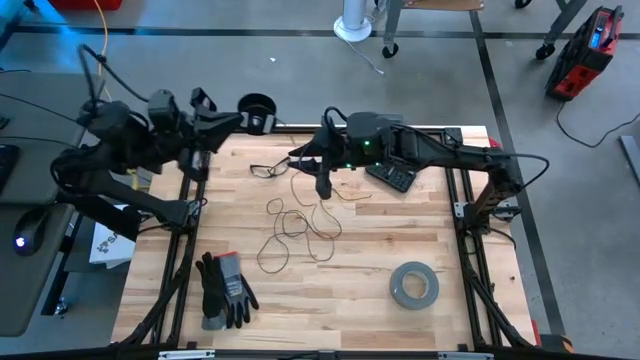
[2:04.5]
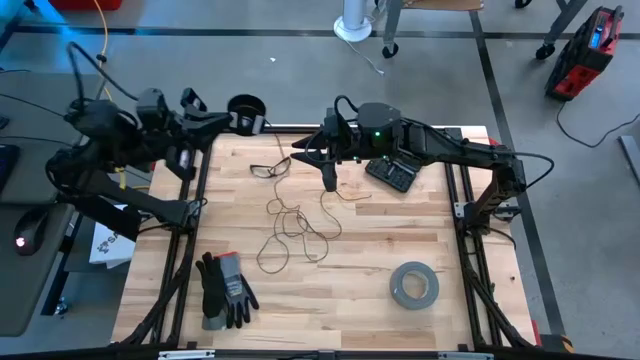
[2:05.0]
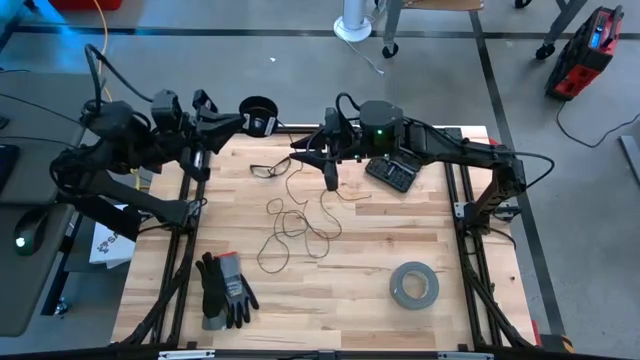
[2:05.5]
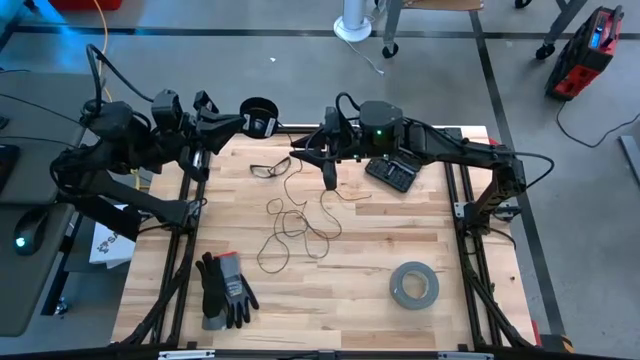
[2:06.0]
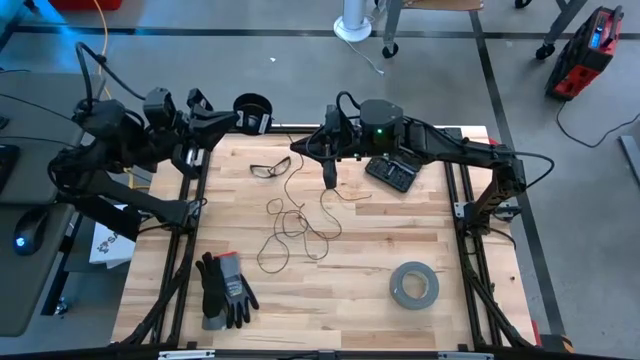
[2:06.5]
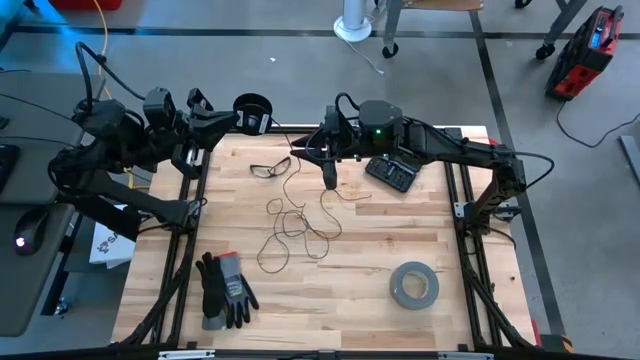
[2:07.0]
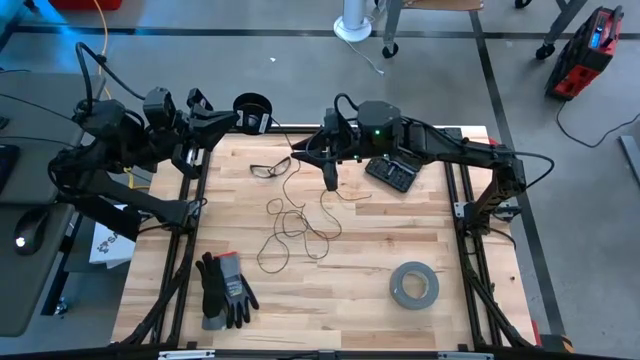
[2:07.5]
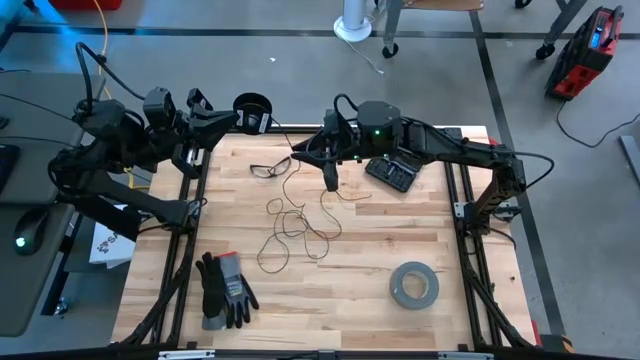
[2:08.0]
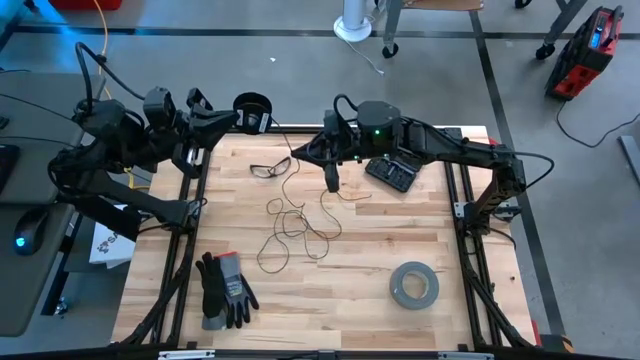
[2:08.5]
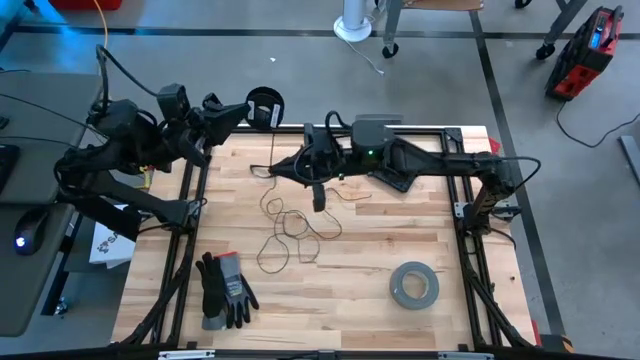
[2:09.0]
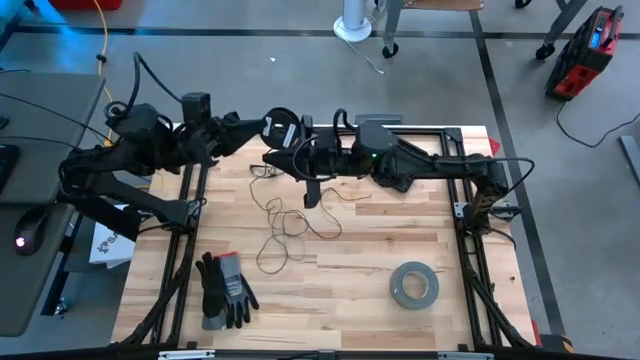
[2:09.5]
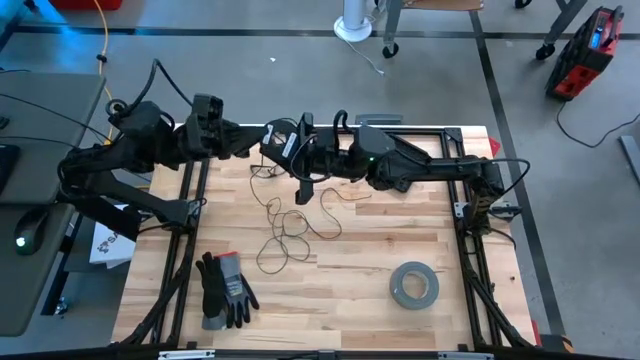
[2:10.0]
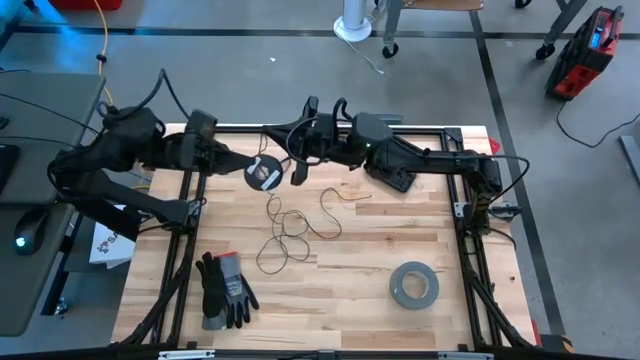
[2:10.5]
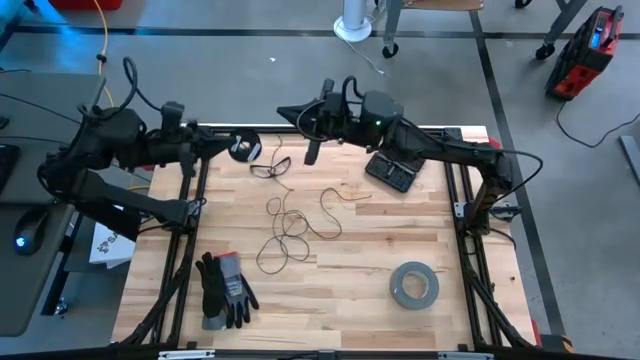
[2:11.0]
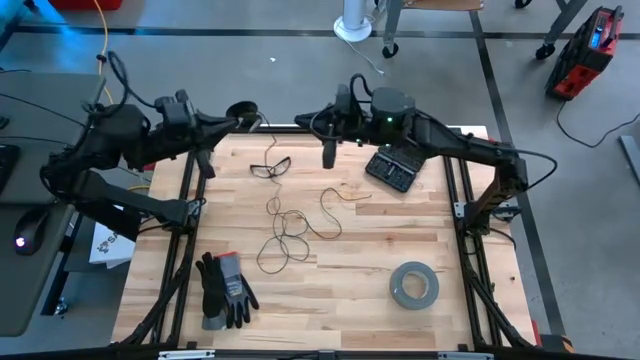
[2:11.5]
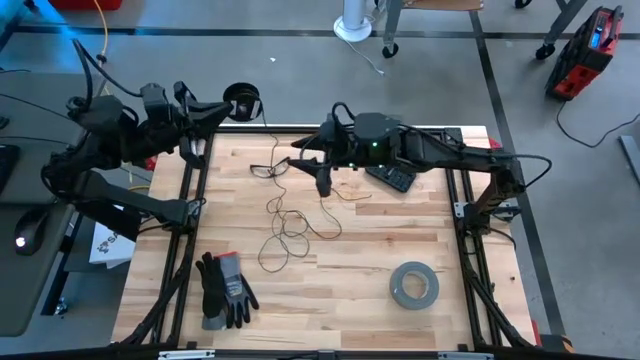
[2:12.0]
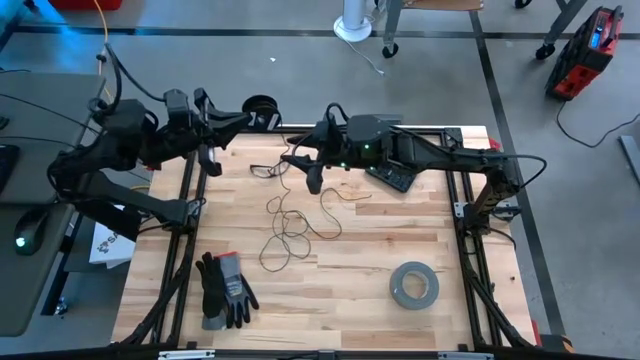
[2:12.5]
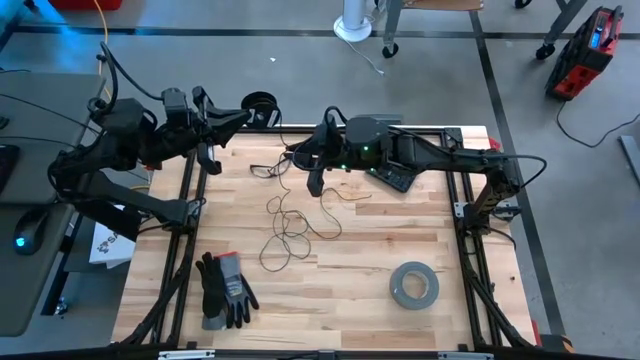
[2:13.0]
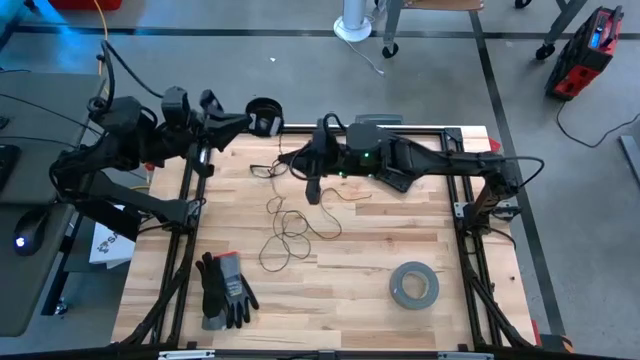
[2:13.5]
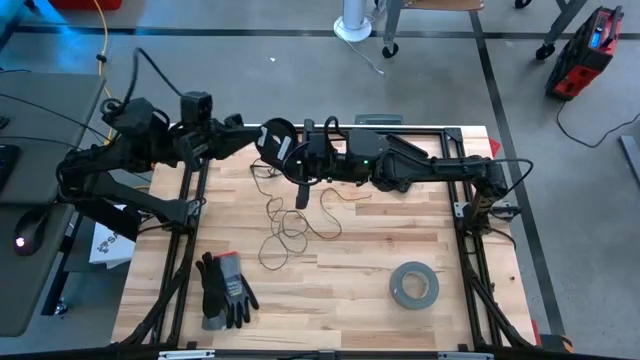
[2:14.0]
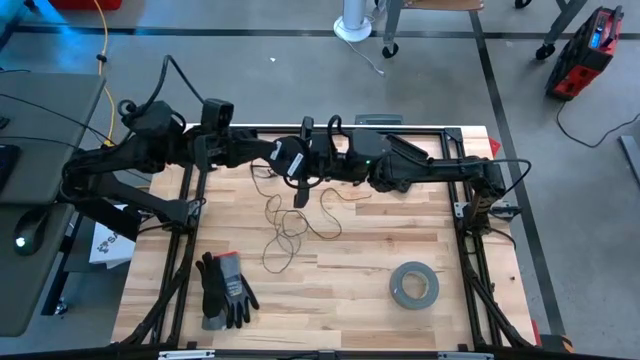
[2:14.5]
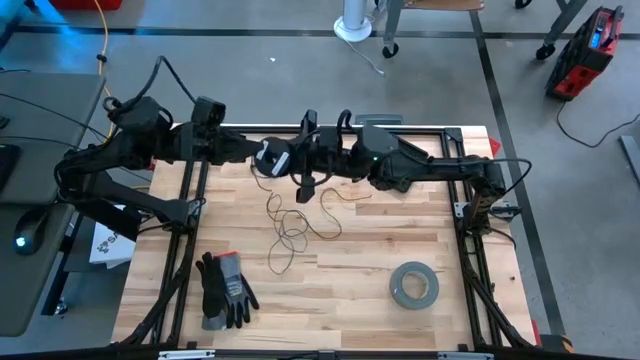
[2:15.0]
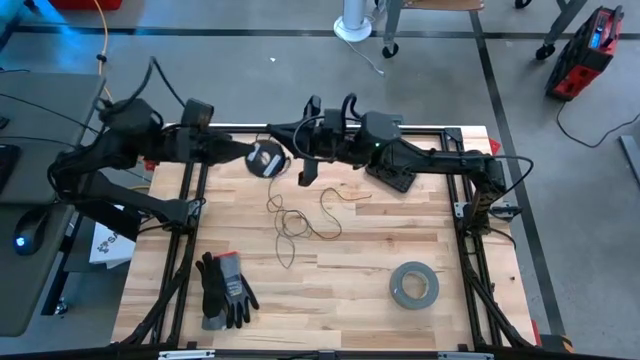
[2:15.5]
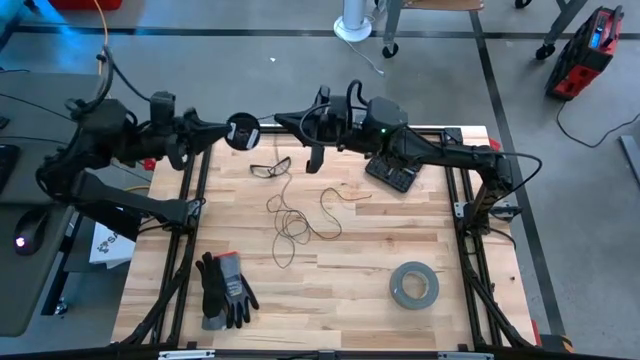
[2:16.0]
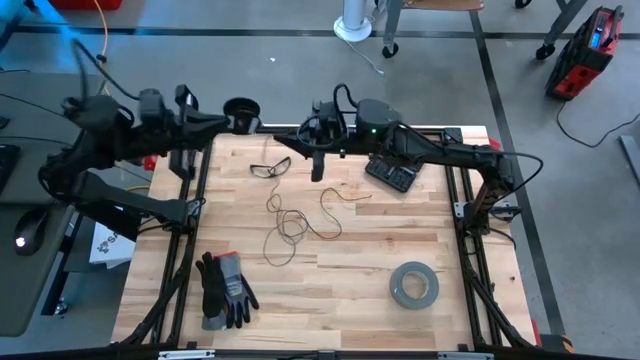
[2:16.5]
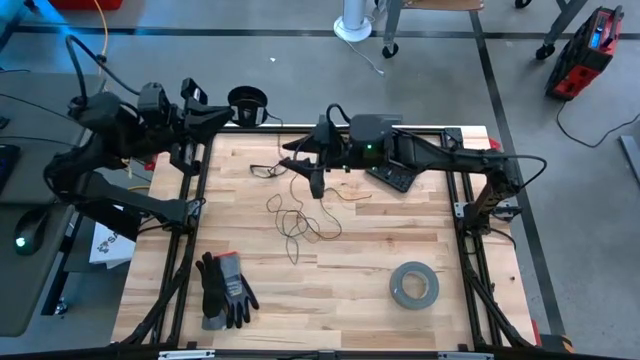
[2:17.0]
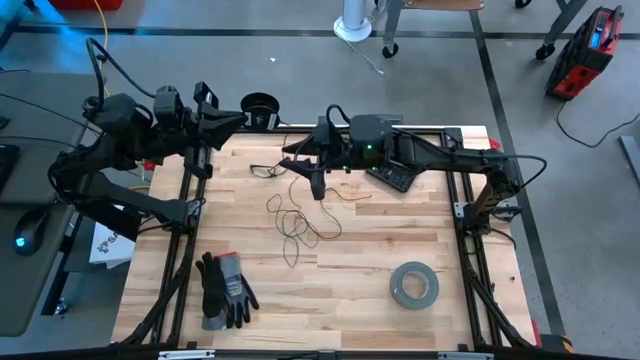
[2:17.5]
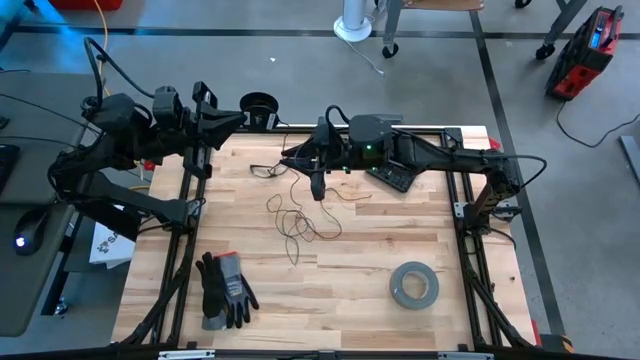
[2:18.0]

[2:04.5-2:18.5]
Task: Coil cords
Coil the black wire on the black spool

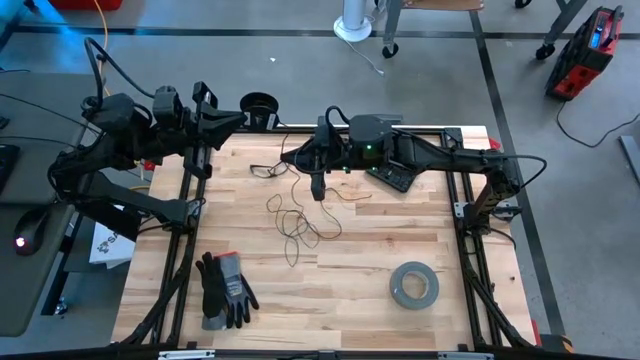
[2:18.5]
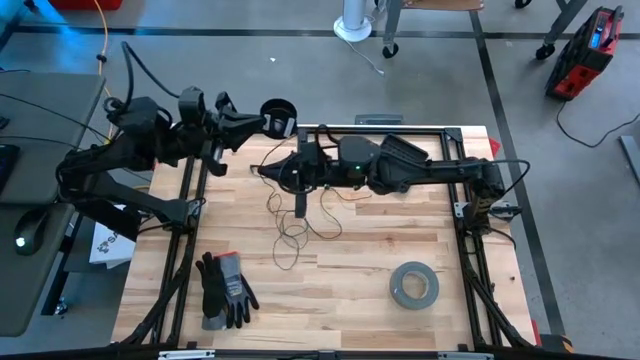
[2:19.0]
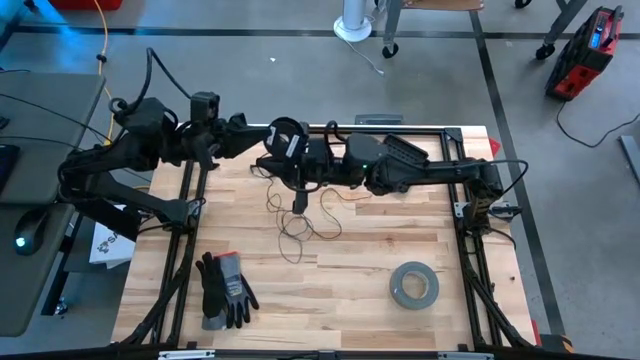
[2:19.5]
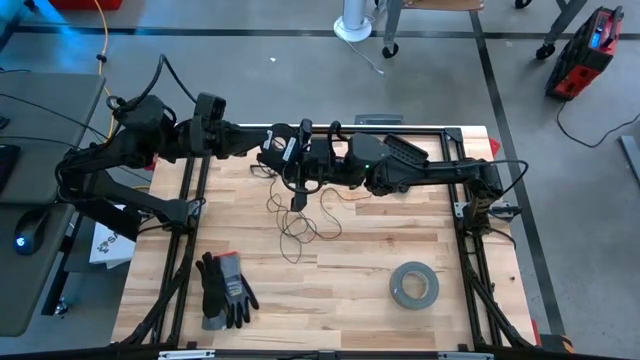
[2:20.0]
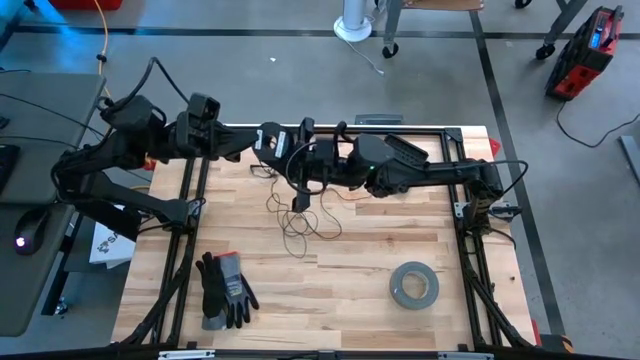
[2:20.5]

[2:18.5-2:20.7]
Coil the black wire on the black spool
